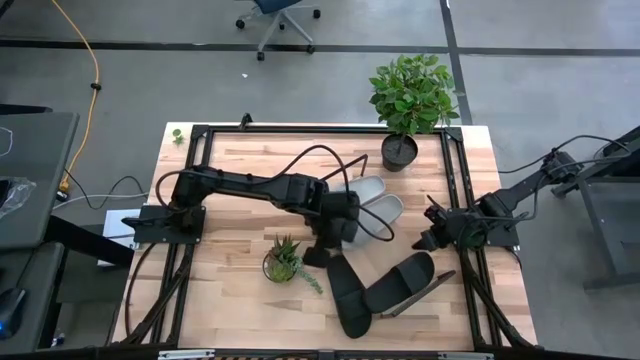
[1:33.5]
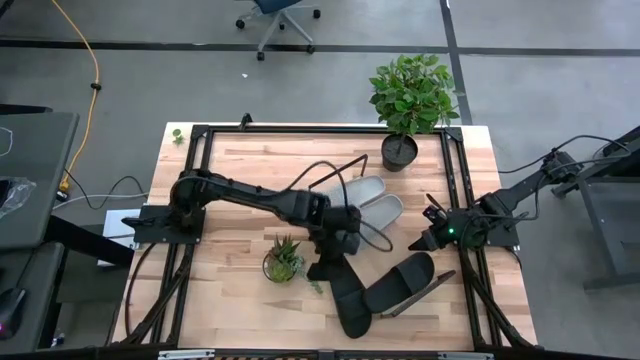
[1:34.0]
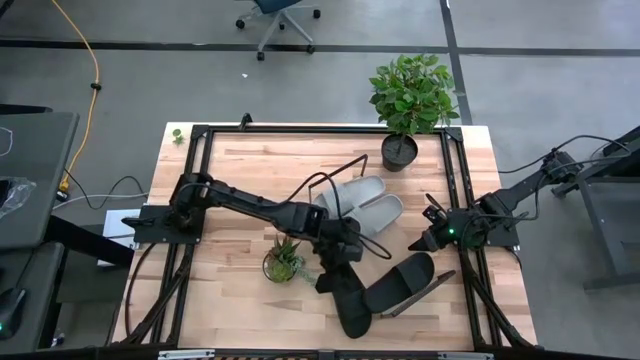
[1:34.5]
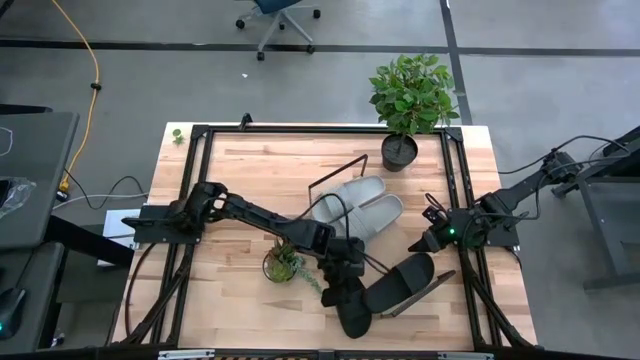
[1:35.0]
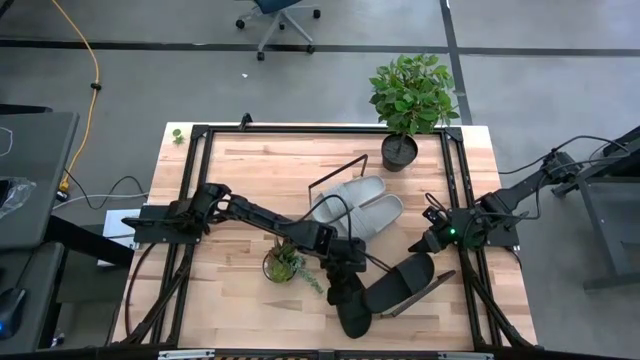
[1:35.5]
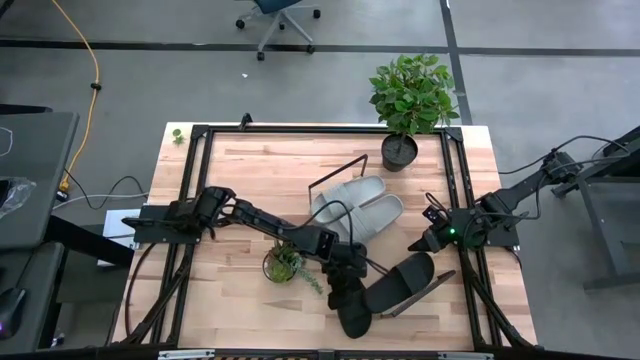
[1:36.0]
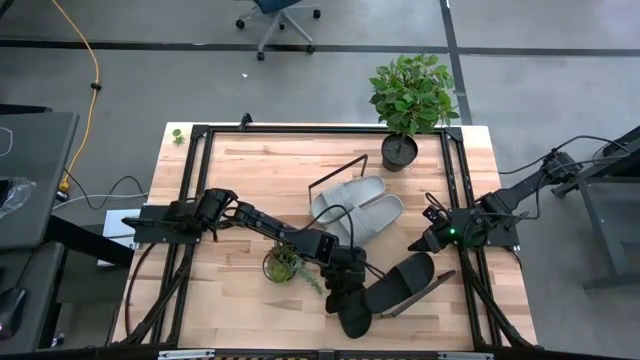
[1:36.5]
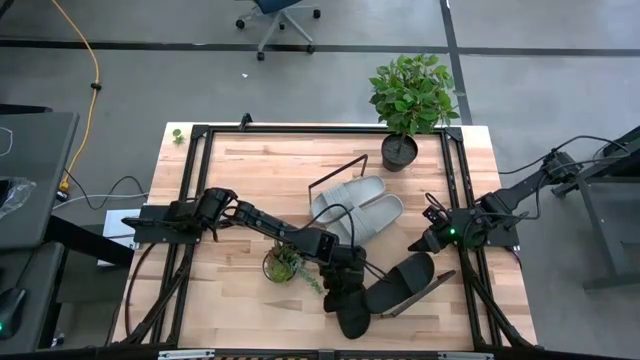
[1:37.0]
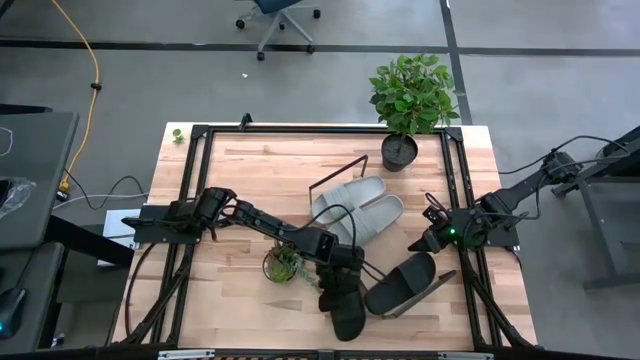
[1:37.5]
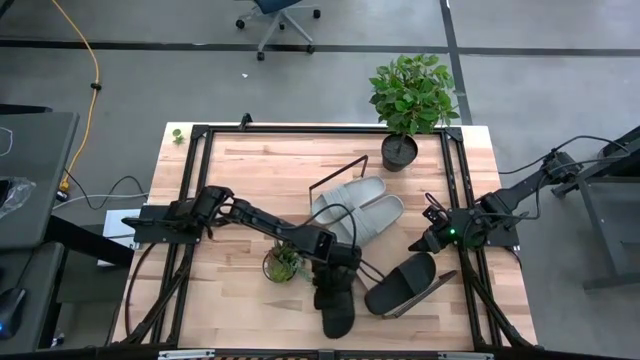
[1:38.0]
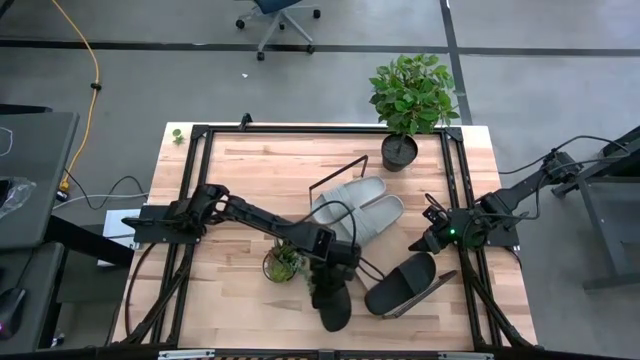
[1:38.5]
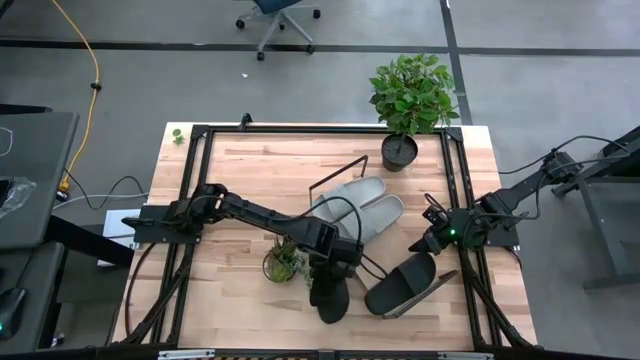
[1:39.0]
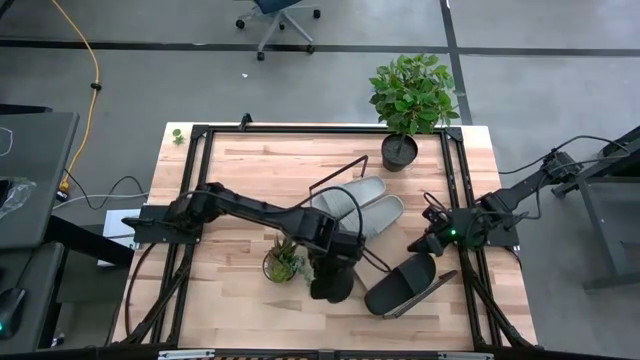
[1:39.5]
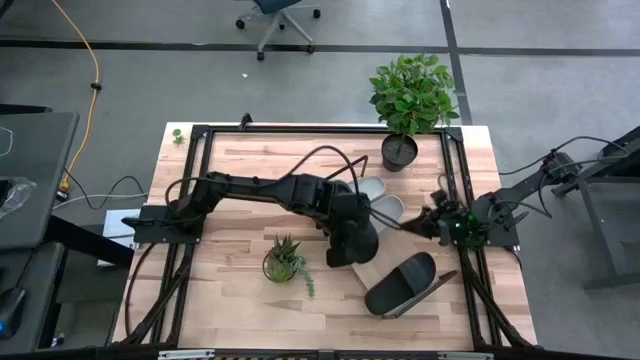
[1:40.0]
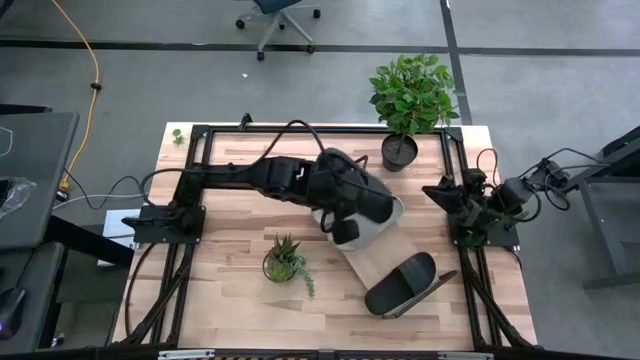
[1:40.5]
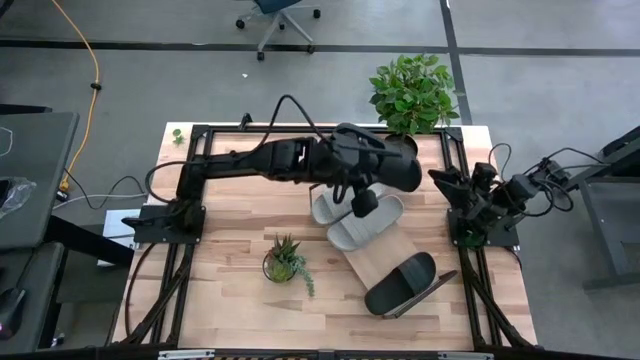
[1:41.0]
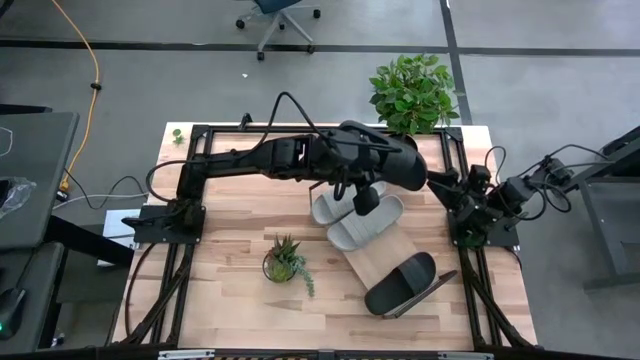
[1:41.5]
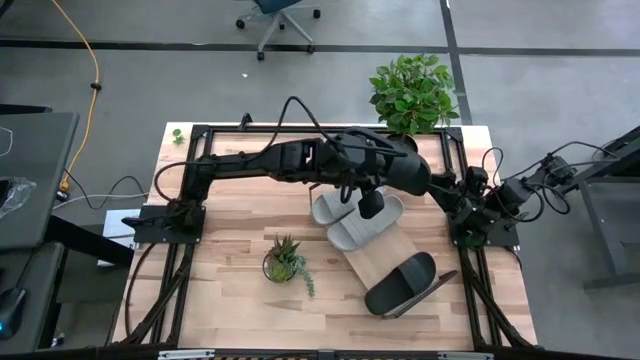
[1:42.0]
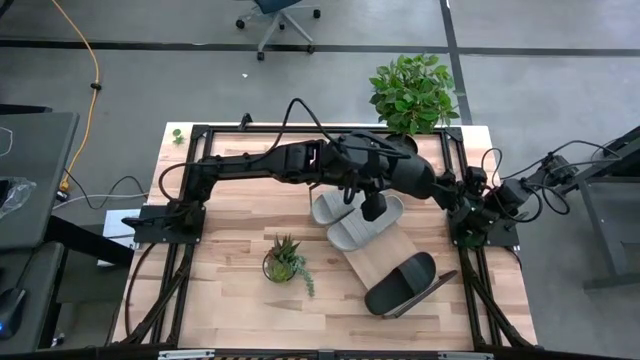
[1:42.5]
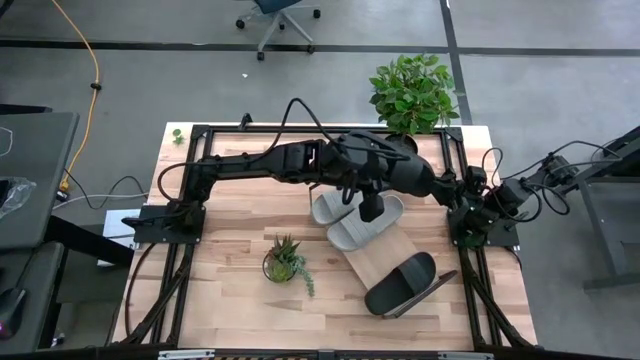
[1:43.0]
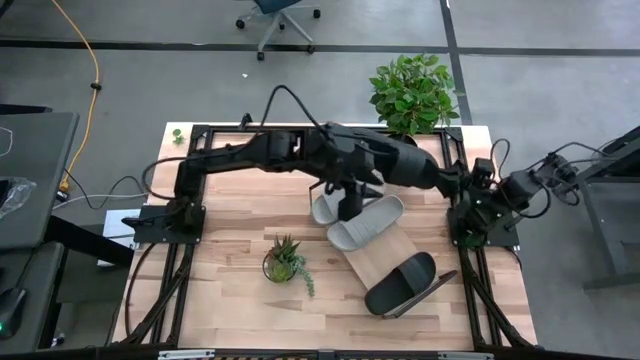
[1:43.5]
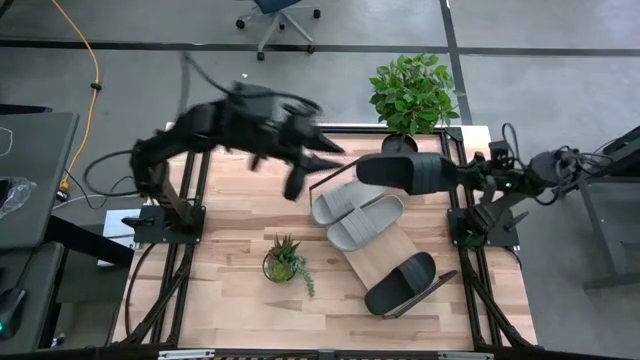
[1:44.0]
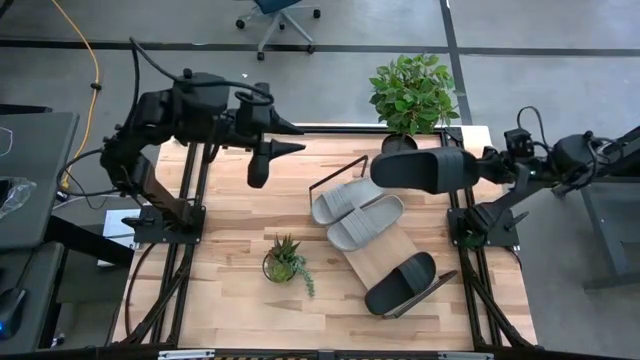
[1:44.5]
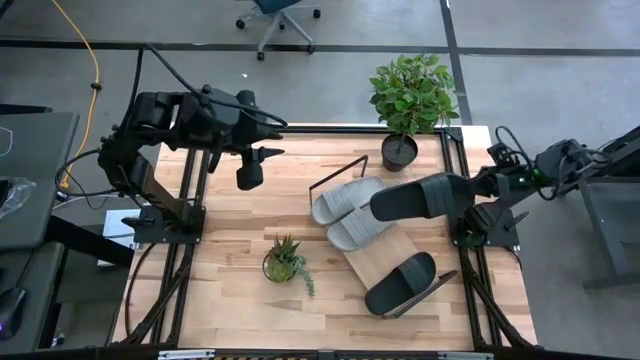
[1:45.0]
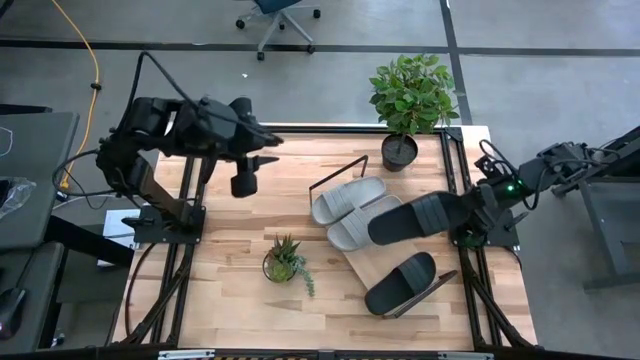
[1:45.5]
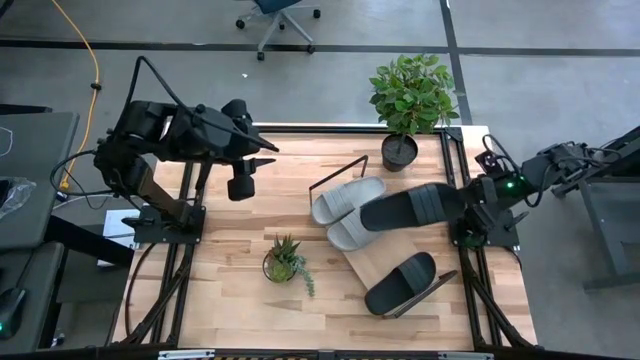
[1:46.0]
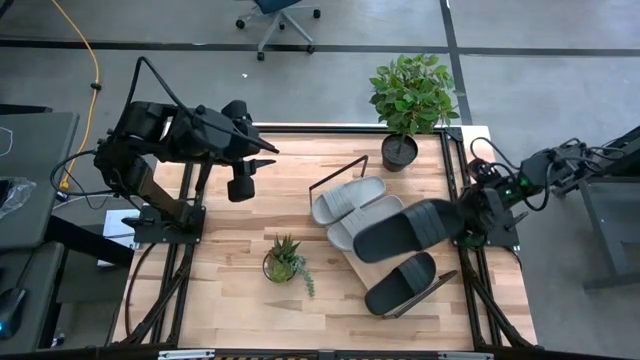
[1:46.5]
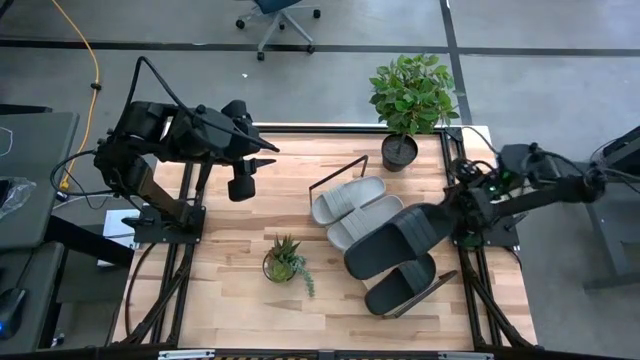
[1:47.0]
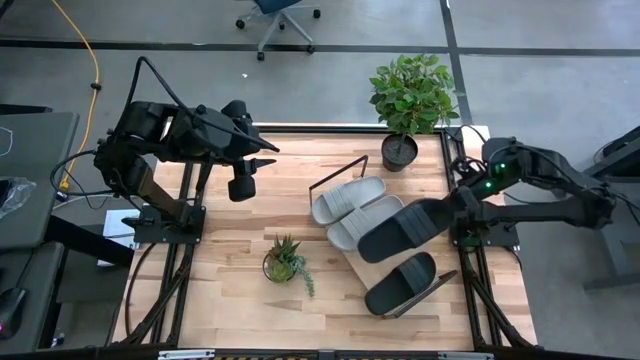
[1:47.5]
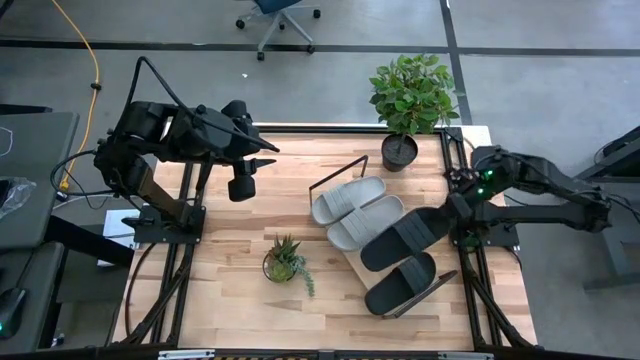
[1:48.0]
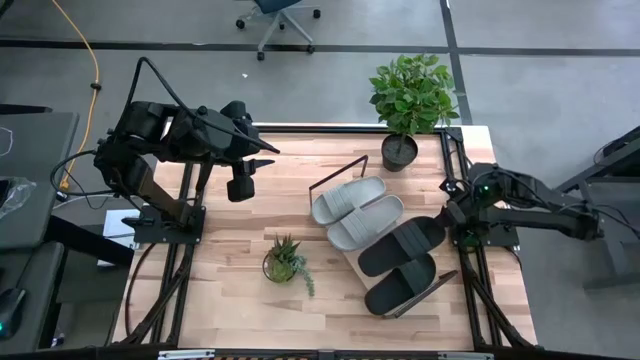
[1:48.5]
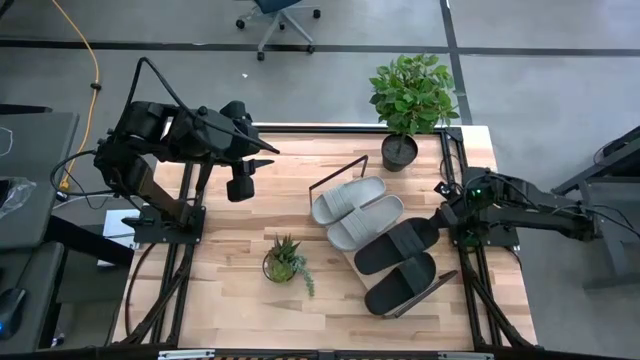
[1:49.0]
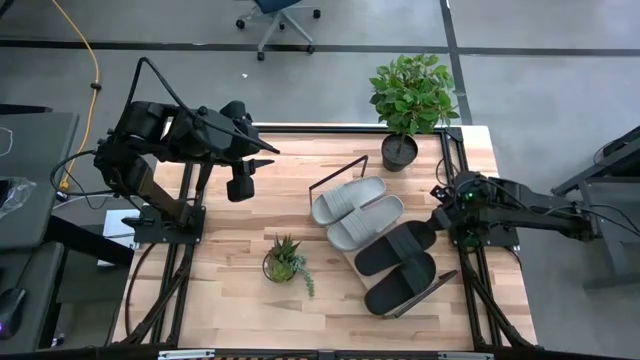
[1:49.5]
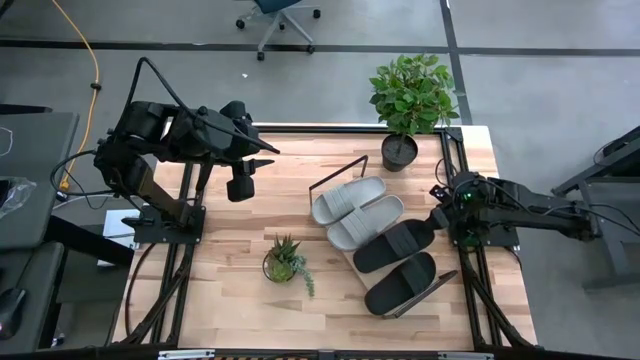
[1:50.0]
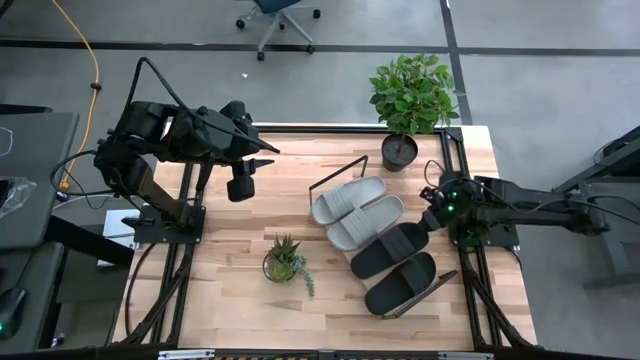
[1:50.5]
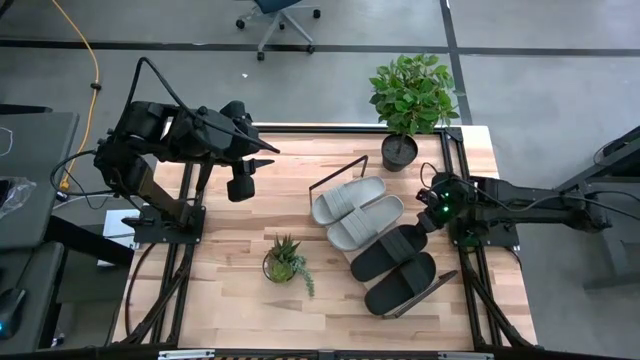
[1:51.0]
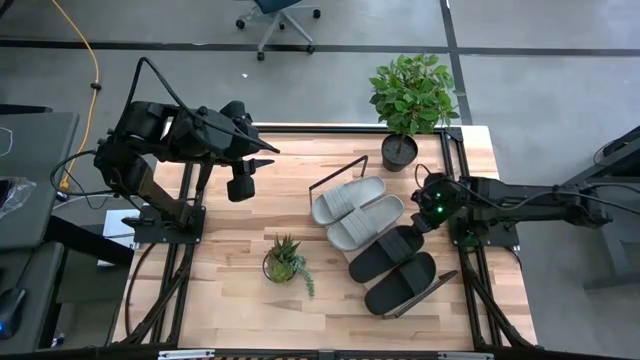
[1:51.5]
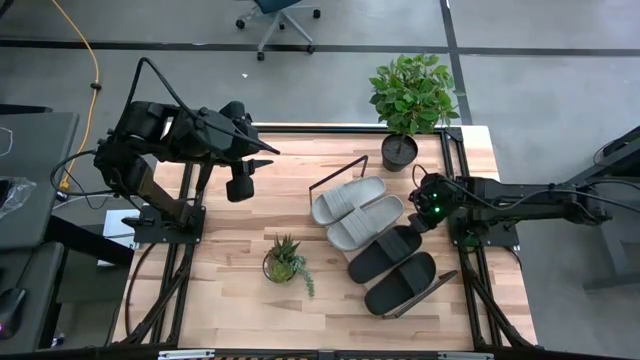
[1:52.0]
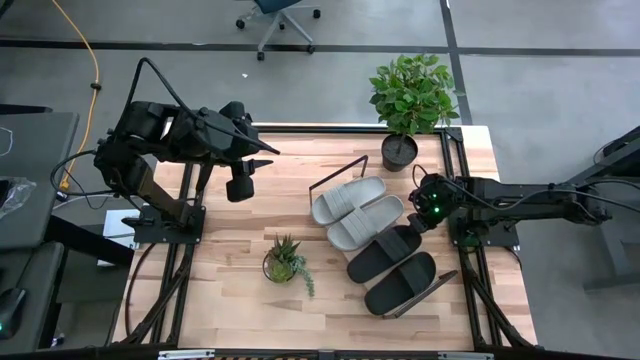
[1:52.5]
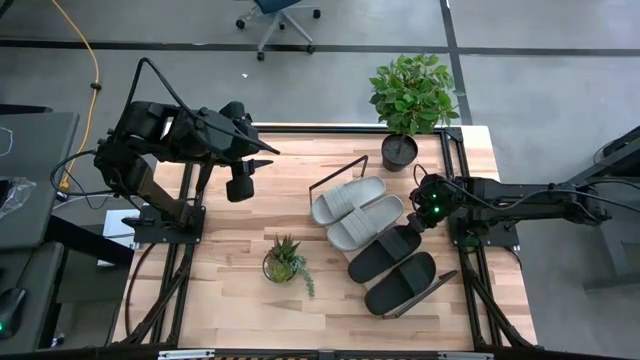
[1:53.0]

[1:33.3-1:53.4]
Task: Pick and place slides into the shelf
Put the black slide on the shelf
